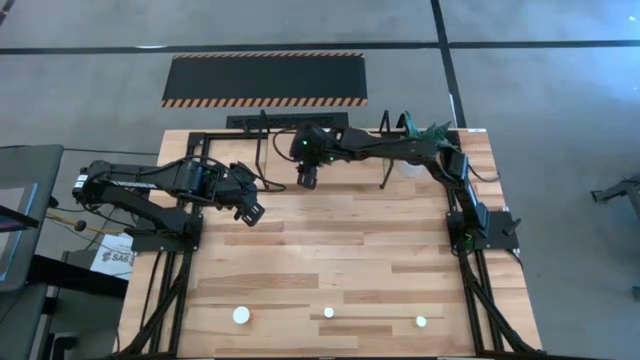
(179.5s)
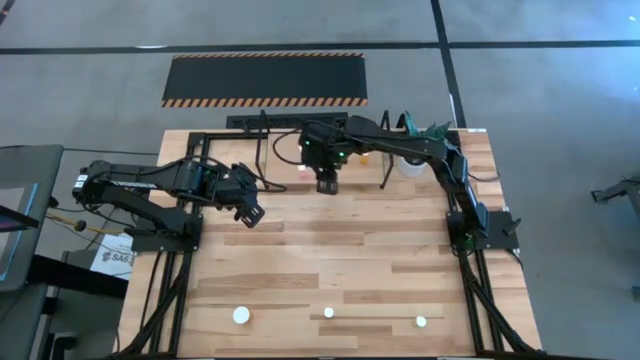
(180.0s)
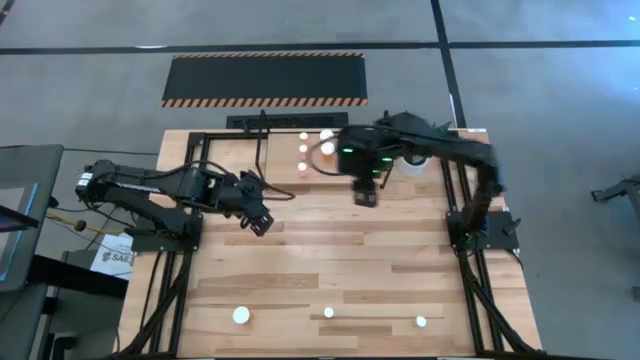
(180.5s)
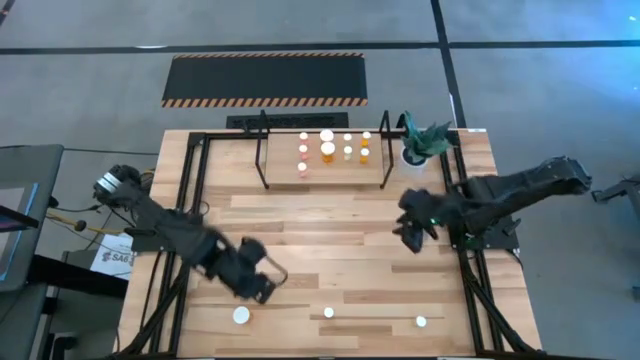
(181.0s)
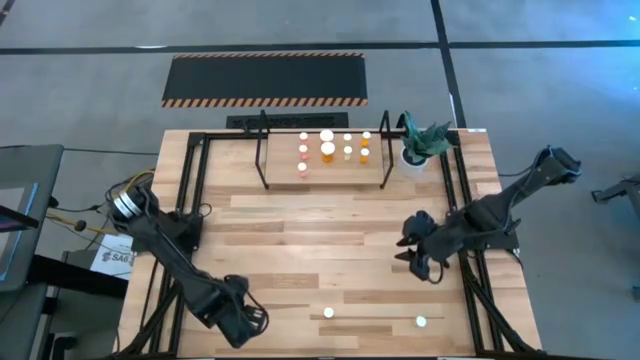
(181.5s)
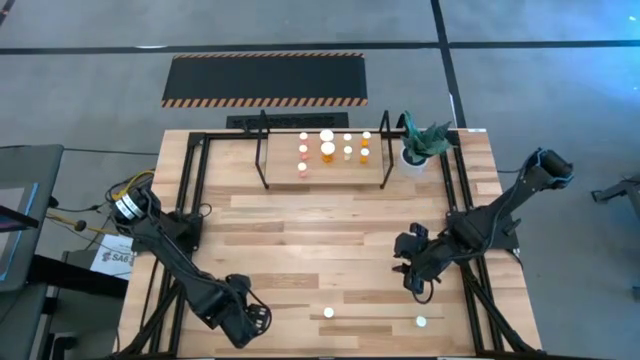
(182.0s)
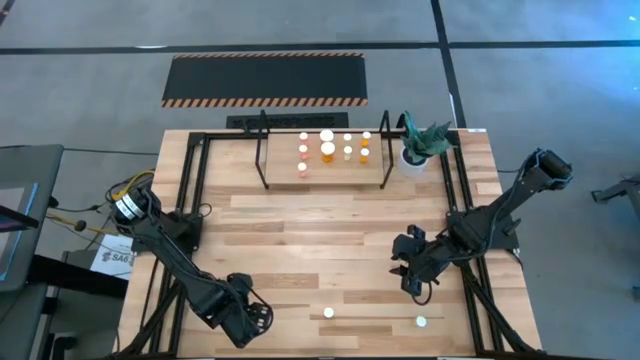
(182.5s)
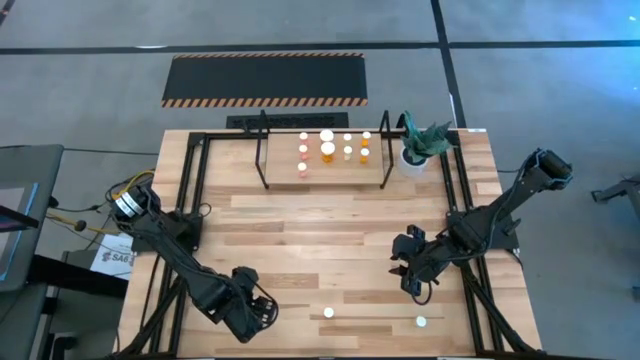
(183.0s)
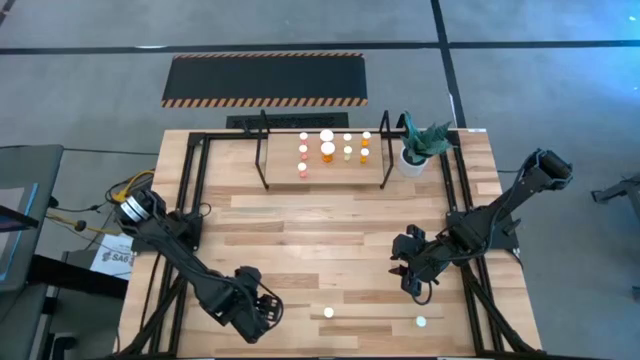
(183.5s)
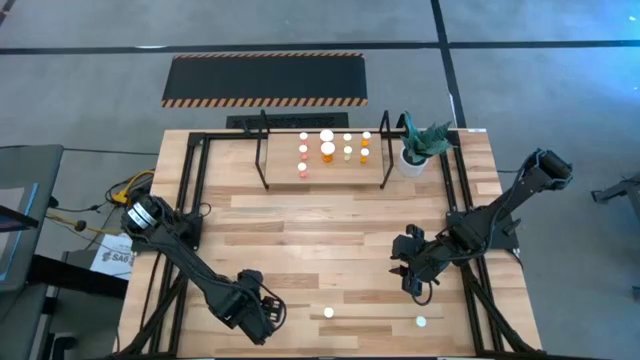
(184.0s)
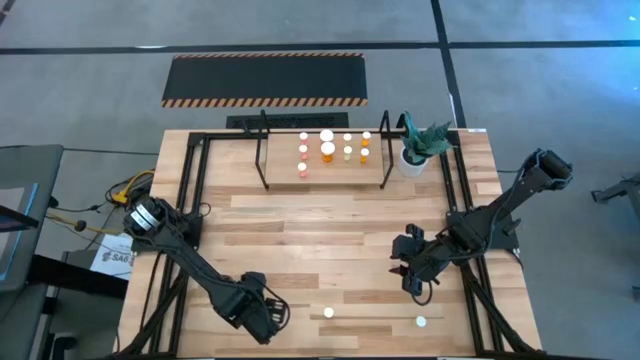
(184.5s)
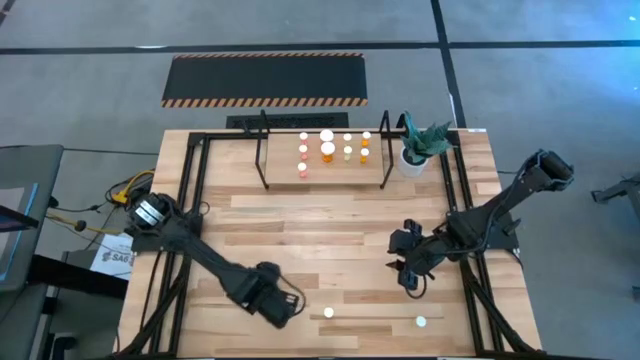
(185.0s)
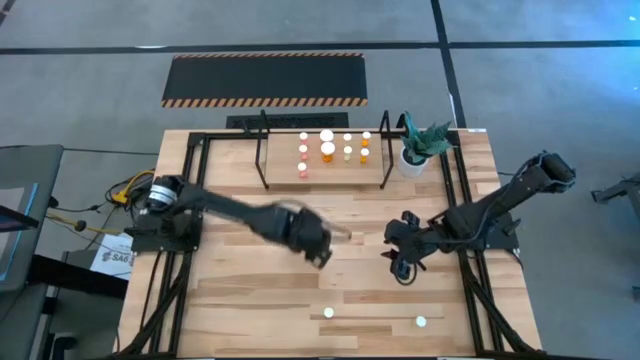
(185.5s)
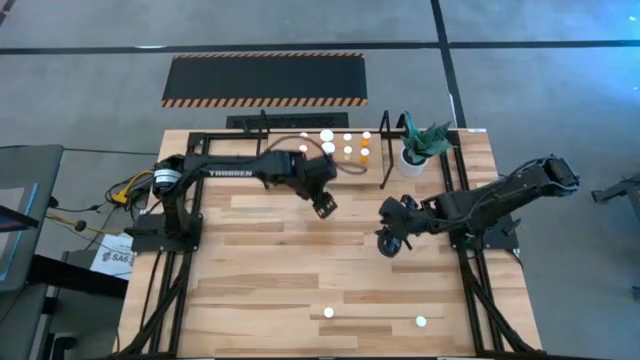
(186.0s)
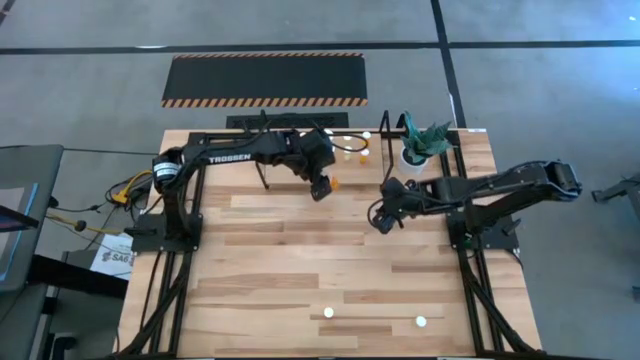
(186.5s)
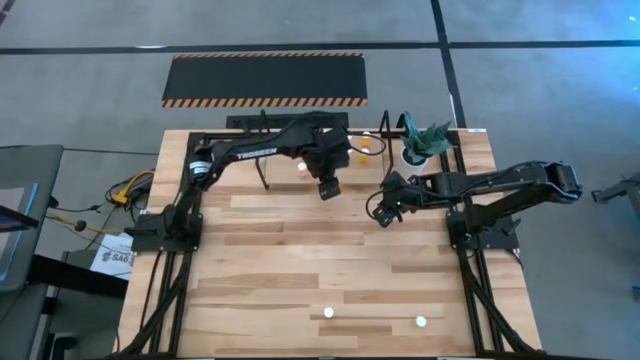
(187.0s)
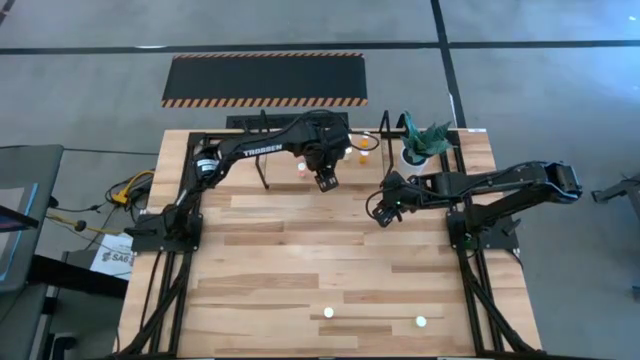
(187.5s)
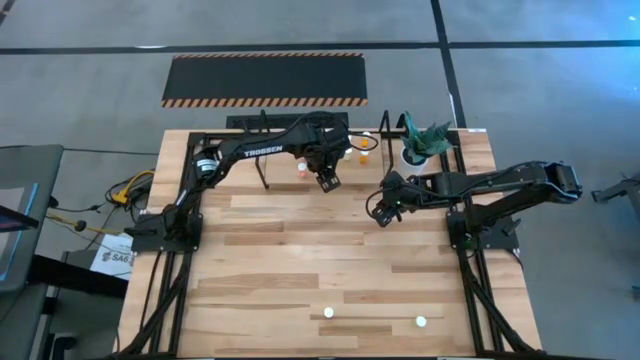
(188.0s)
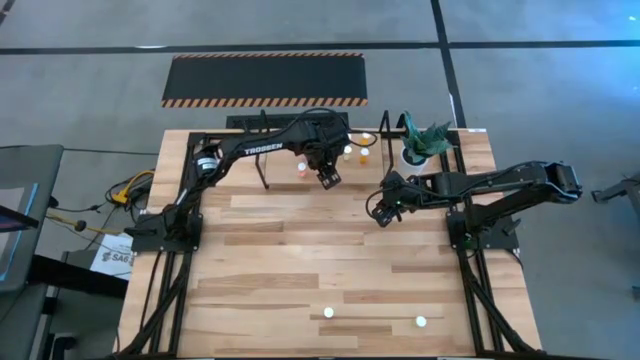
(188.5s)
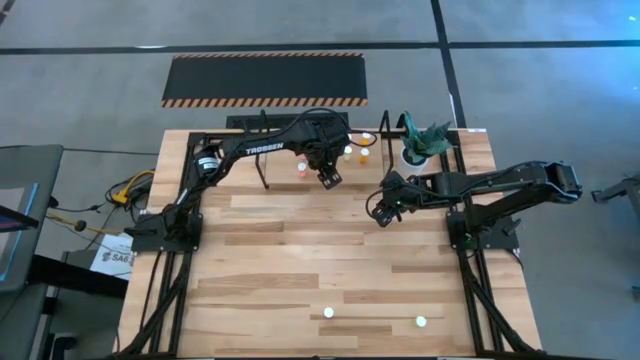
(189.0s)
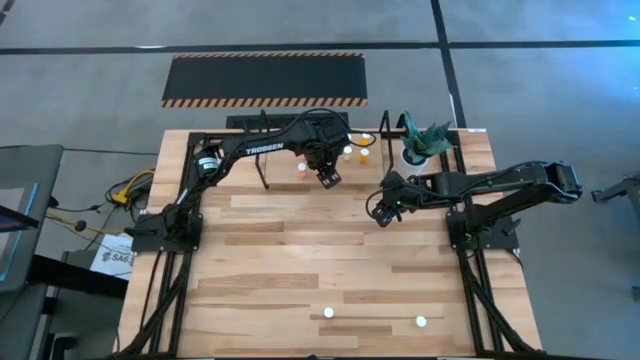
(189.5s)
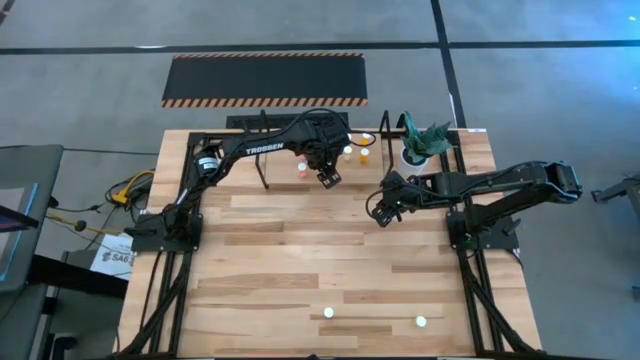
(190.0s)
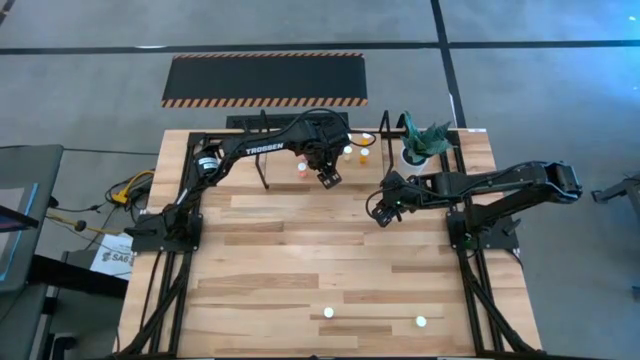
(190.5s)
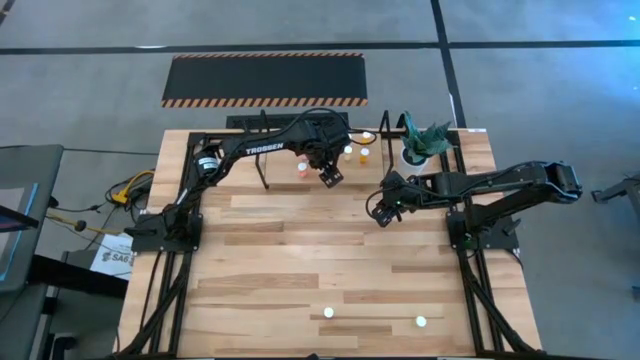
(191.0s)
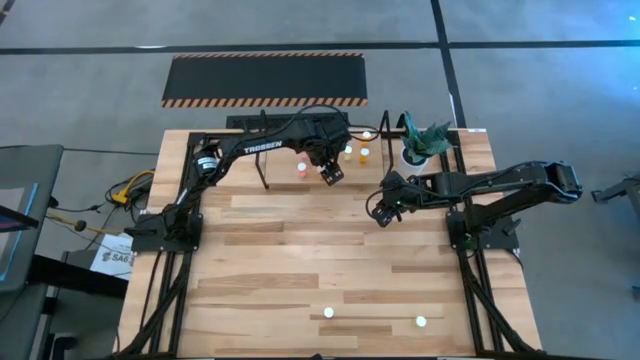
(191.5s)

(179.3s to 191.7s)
Task: Pick and place medicine bottles onto shelf by color
Put the large orange pill bottle on the shelf aligned with the other large orange pill bottles

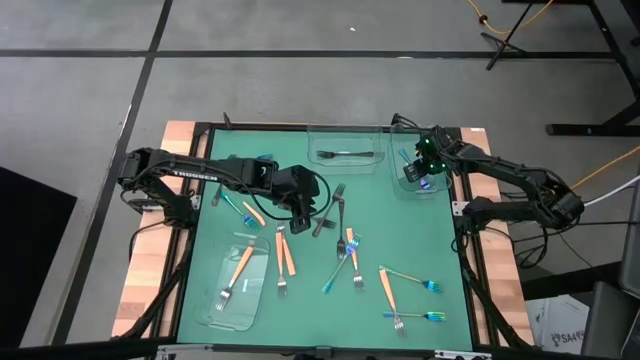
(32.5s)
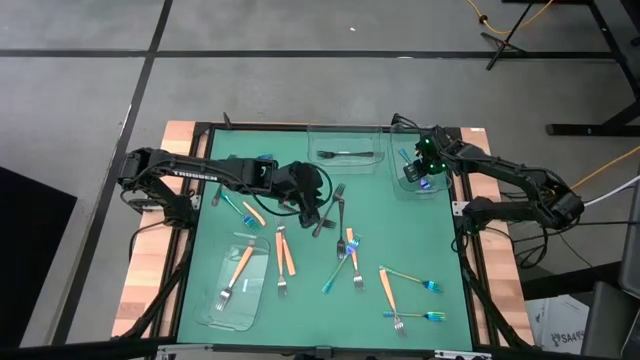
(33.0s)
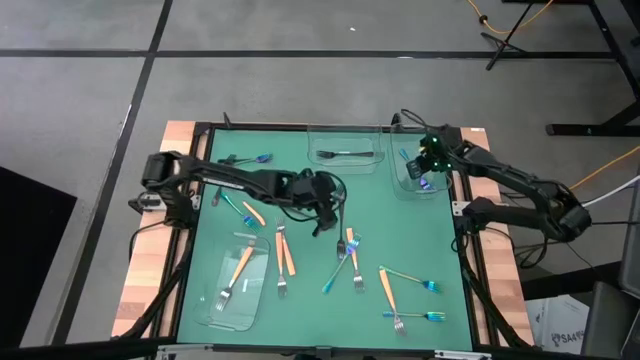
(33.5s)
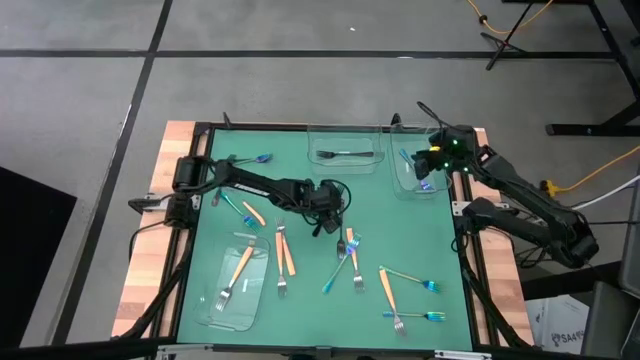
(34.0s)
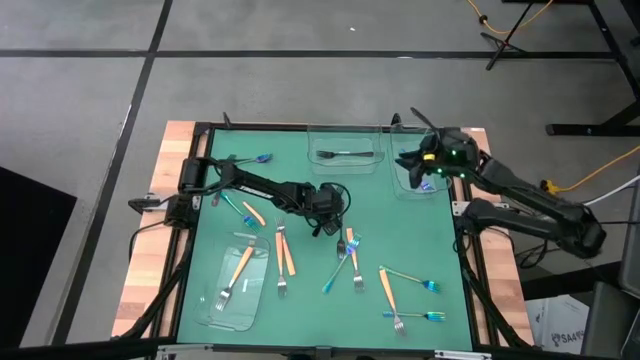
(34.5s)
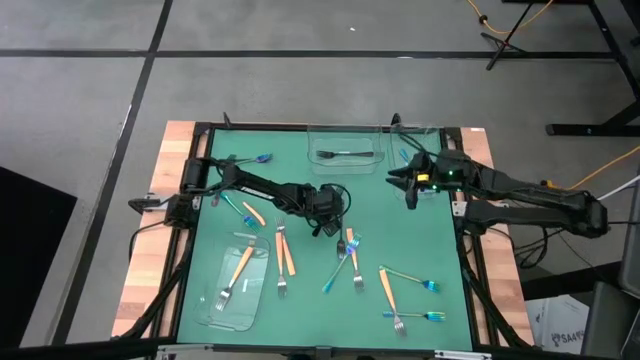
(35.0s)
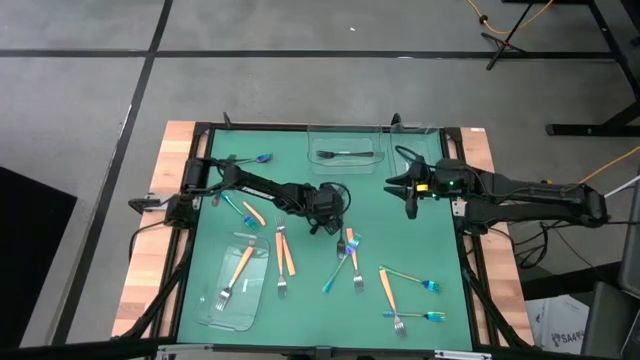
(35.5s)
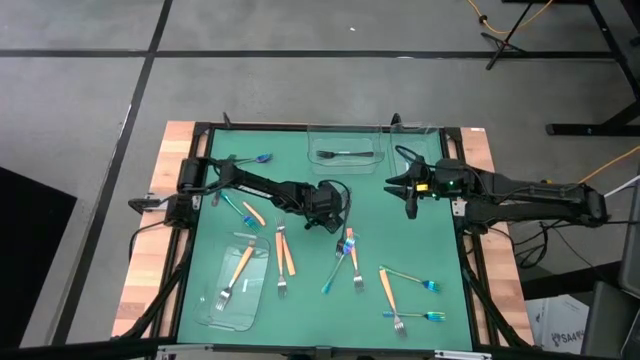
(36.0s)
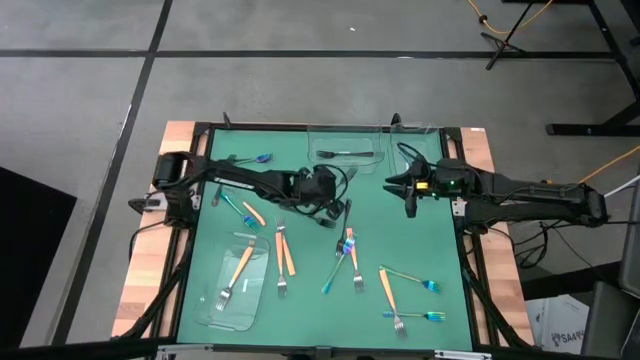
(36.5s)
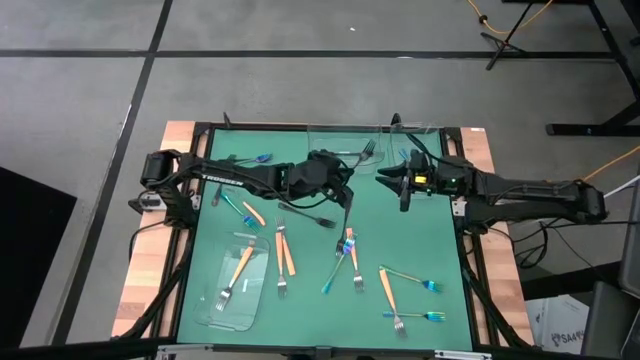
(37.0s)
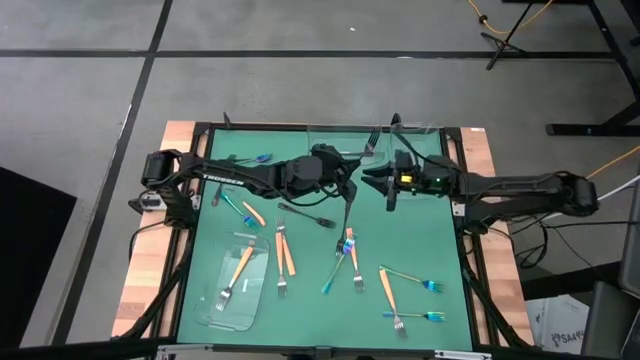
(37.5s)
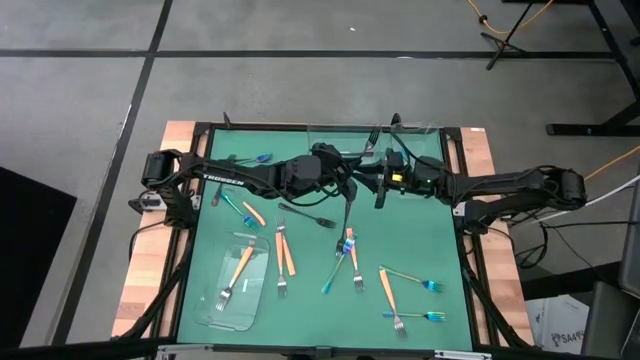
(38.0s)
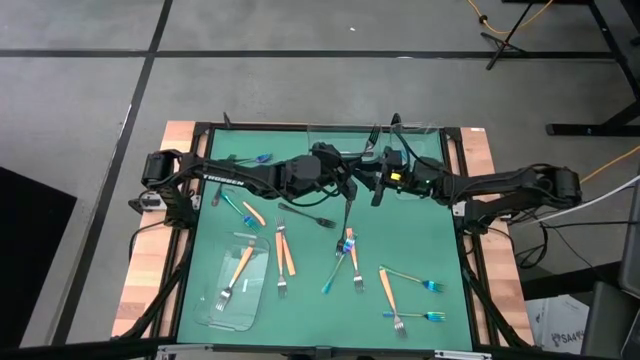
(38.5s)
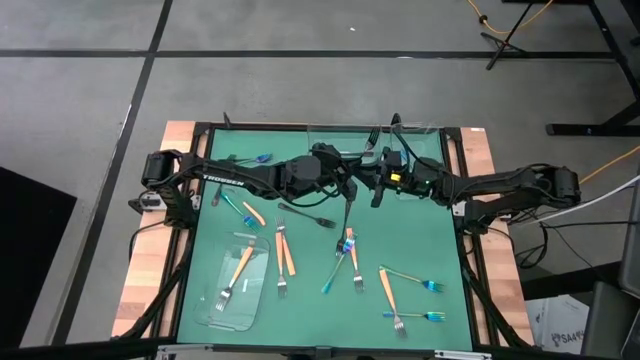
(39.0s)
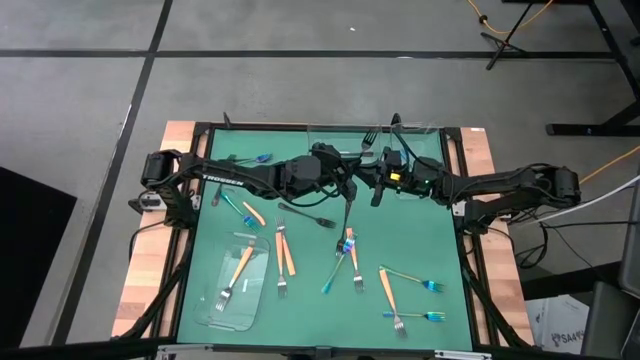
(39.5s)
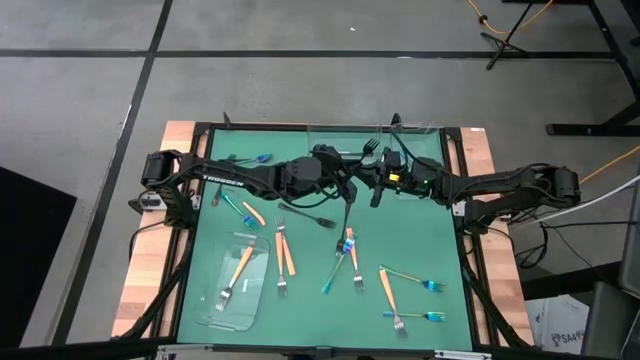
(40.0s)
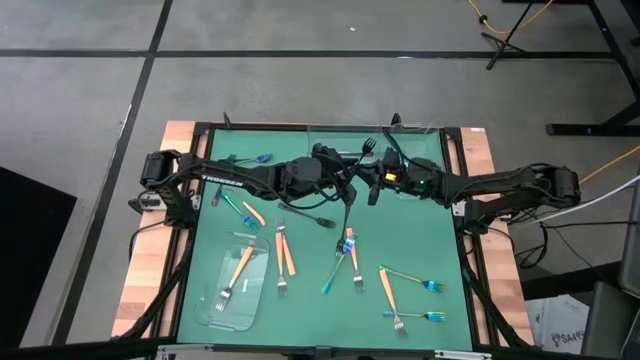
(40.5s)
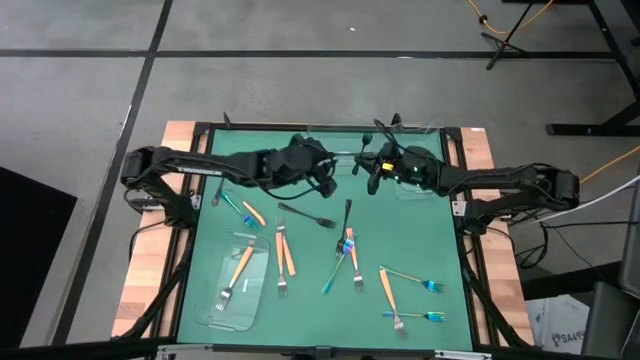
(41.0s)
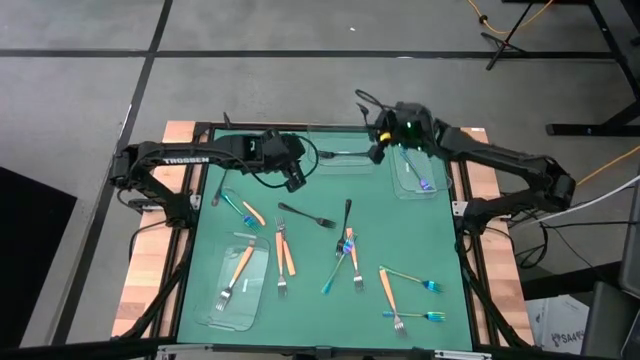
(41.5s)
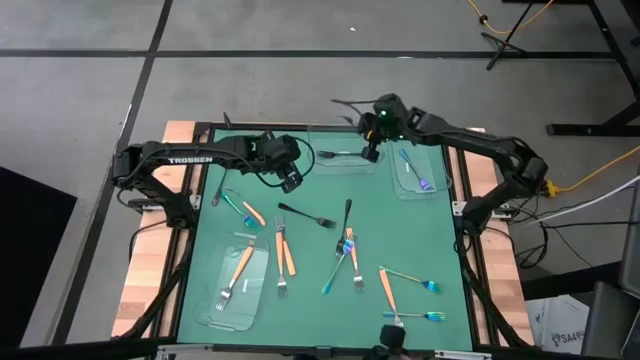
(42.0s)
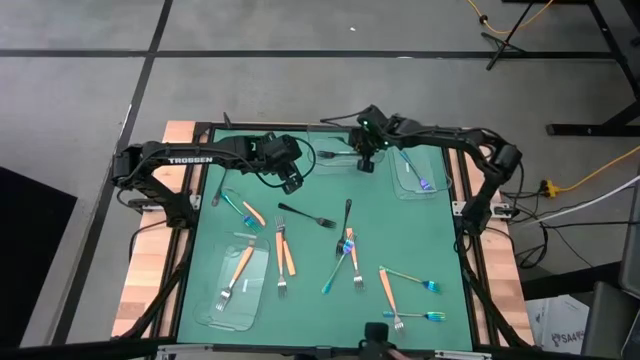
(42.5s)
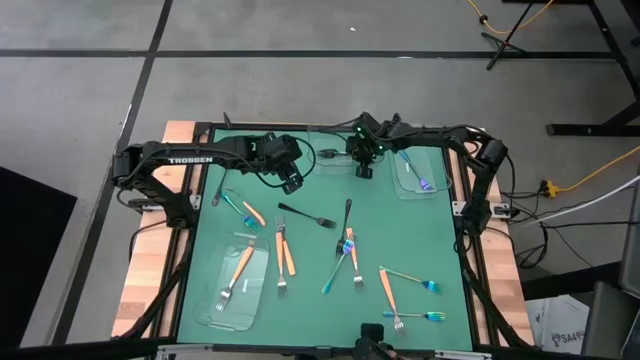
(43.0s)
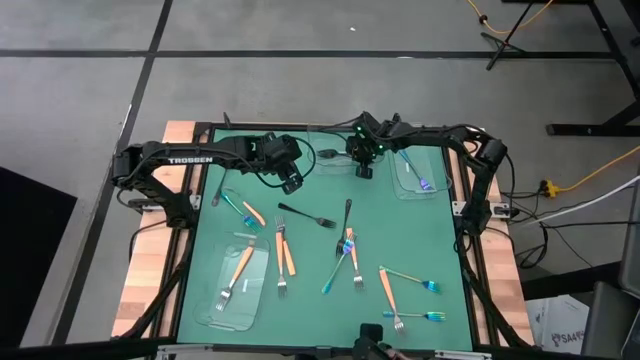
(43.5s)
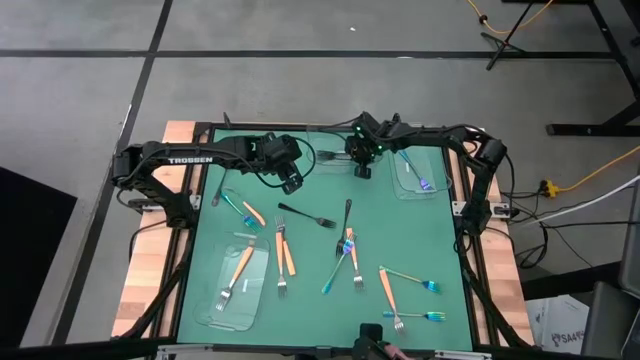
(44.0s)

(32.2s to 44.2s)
Task: Sort silverware by color (type)
Put the black fork into the top left transparent bin
